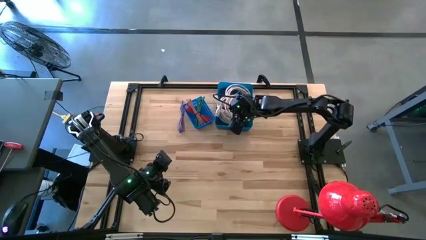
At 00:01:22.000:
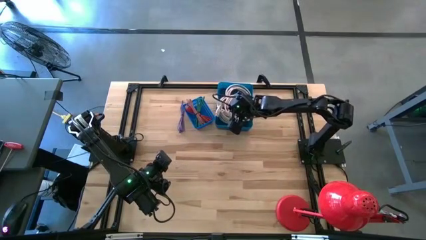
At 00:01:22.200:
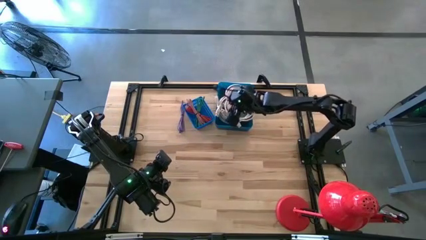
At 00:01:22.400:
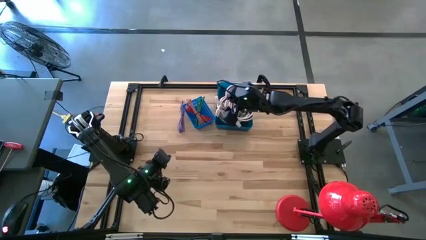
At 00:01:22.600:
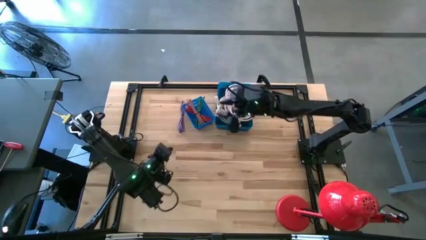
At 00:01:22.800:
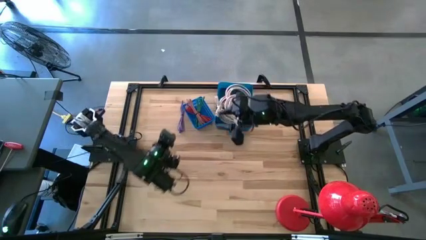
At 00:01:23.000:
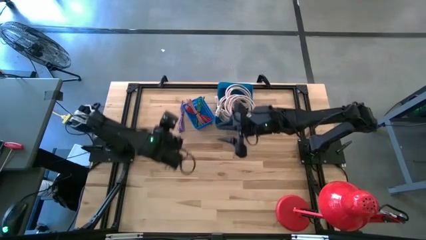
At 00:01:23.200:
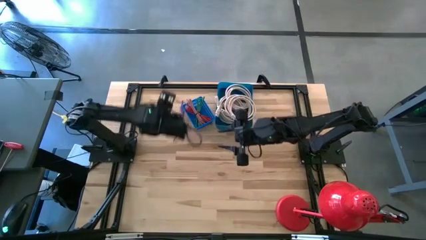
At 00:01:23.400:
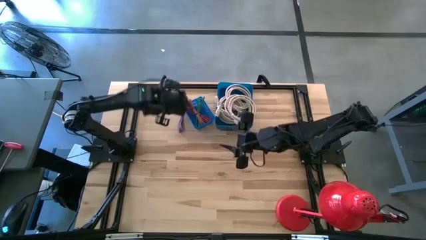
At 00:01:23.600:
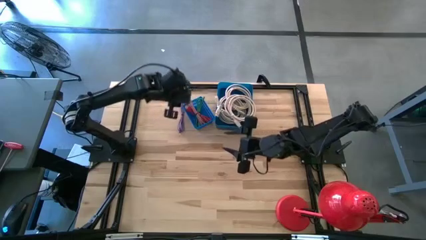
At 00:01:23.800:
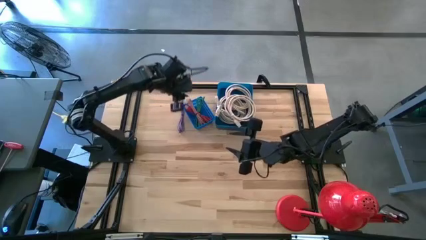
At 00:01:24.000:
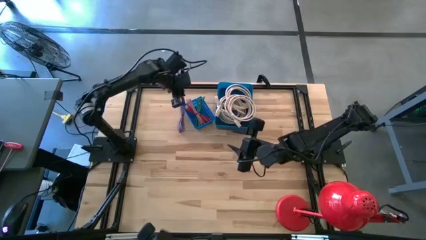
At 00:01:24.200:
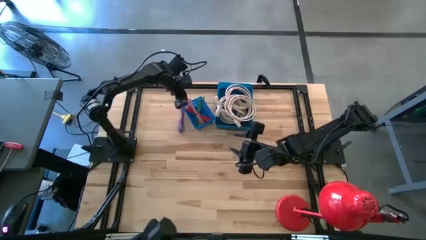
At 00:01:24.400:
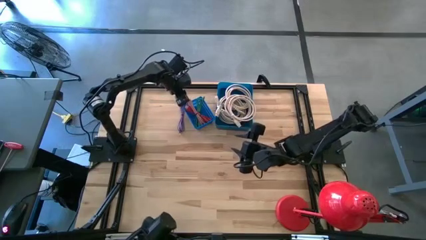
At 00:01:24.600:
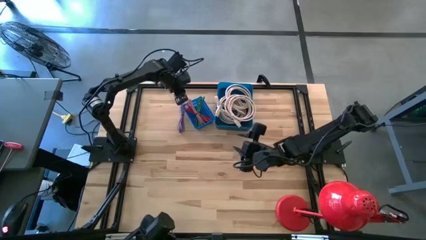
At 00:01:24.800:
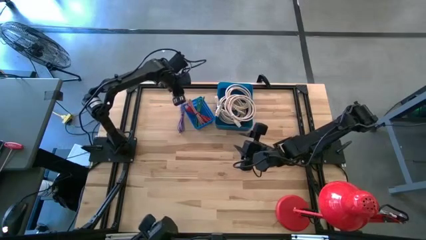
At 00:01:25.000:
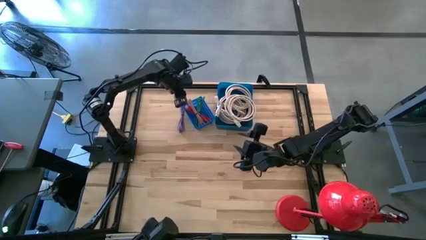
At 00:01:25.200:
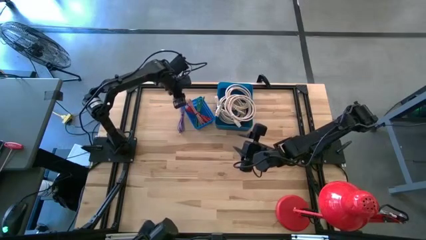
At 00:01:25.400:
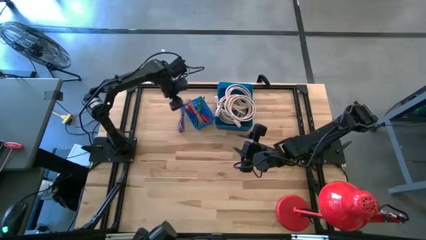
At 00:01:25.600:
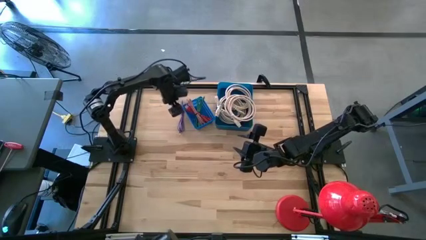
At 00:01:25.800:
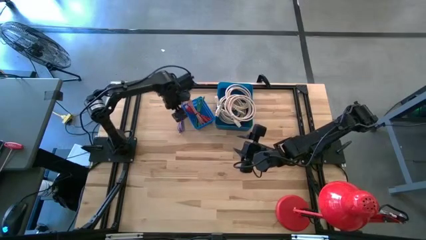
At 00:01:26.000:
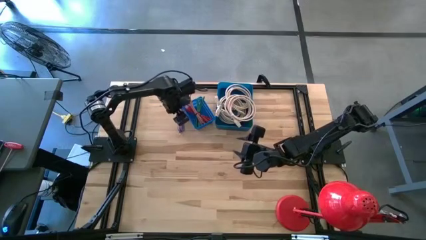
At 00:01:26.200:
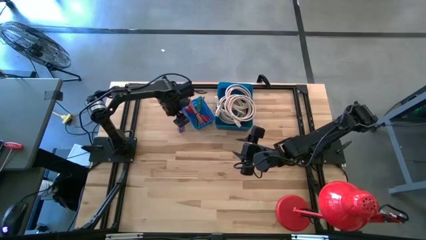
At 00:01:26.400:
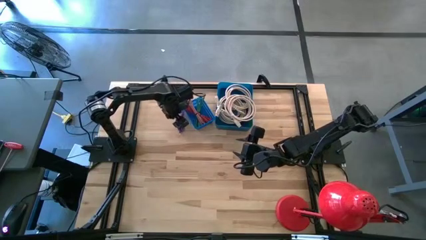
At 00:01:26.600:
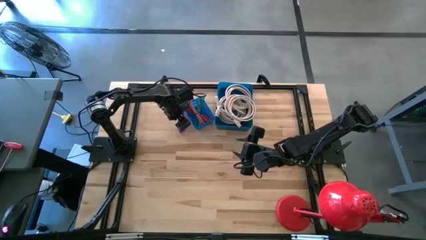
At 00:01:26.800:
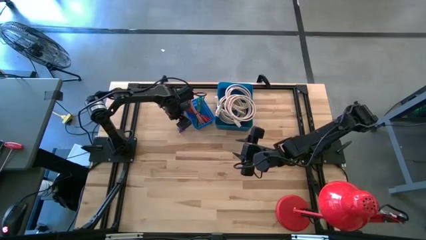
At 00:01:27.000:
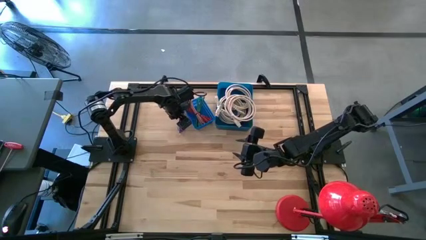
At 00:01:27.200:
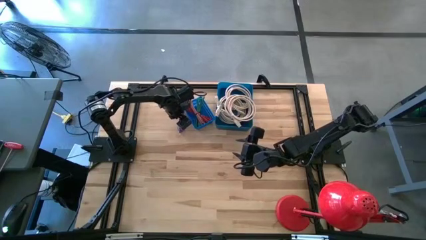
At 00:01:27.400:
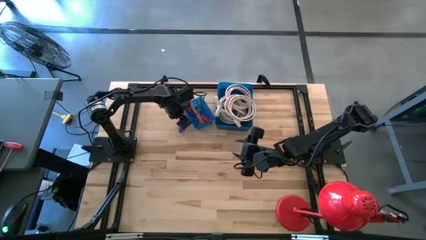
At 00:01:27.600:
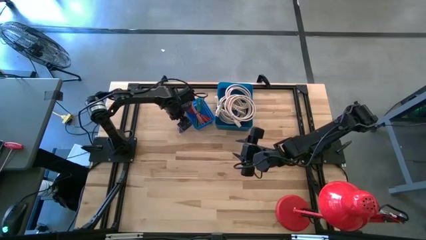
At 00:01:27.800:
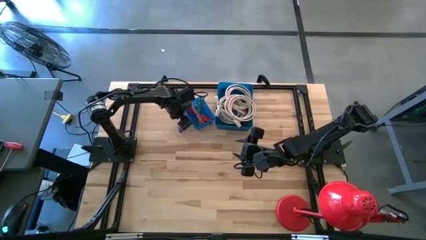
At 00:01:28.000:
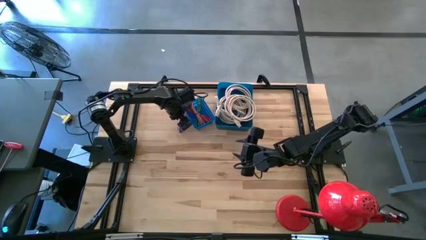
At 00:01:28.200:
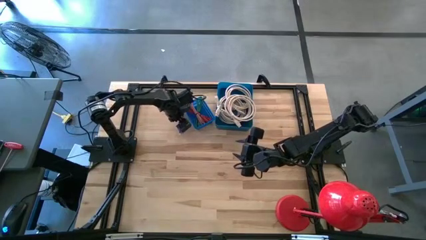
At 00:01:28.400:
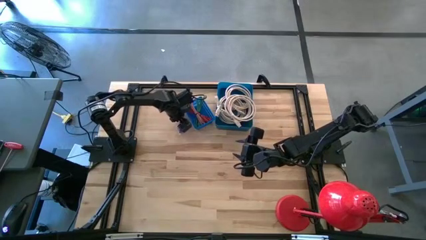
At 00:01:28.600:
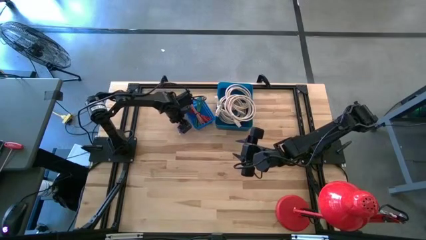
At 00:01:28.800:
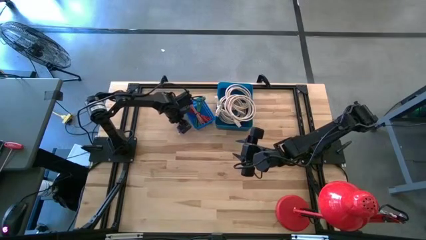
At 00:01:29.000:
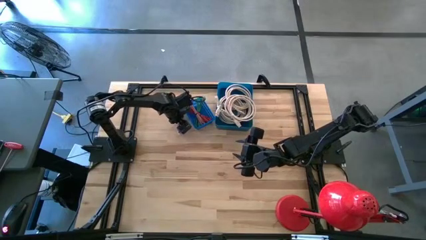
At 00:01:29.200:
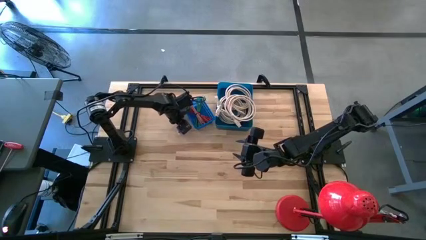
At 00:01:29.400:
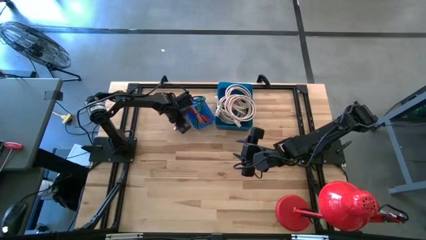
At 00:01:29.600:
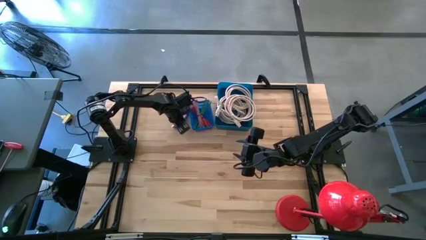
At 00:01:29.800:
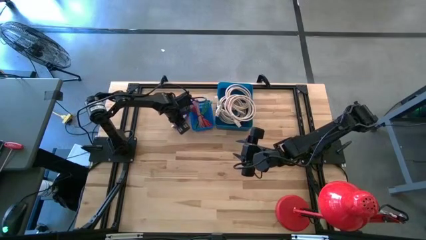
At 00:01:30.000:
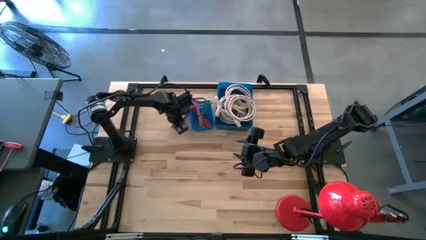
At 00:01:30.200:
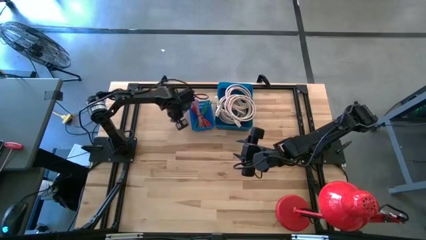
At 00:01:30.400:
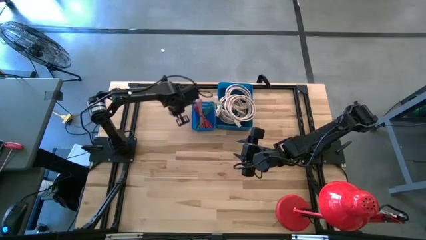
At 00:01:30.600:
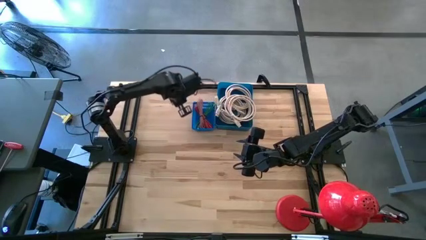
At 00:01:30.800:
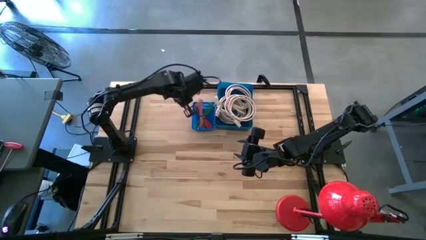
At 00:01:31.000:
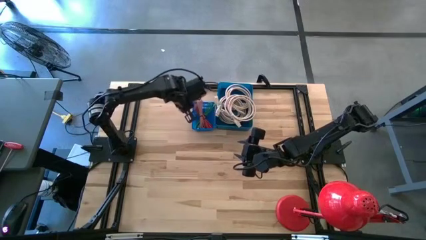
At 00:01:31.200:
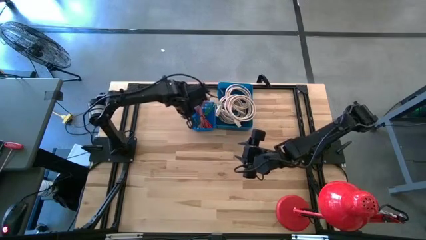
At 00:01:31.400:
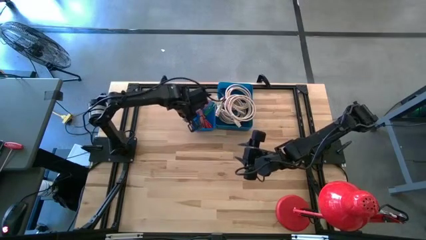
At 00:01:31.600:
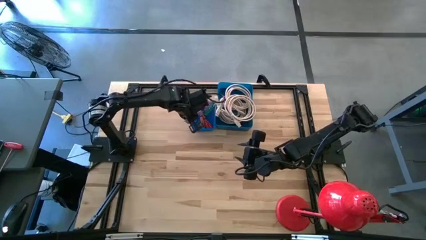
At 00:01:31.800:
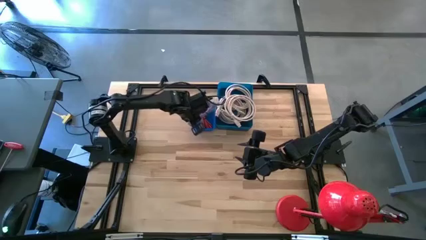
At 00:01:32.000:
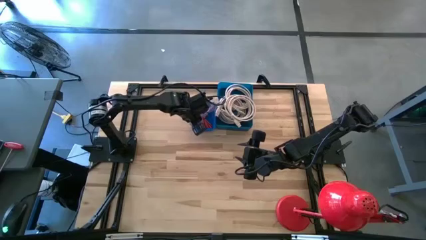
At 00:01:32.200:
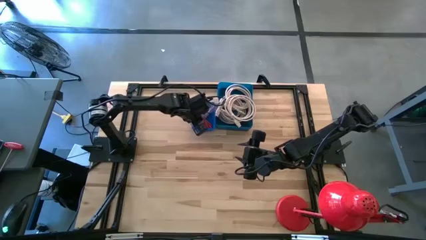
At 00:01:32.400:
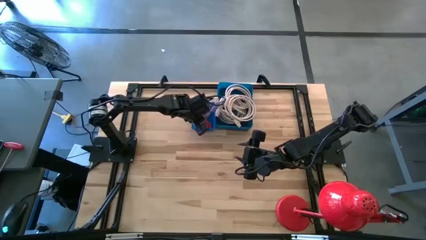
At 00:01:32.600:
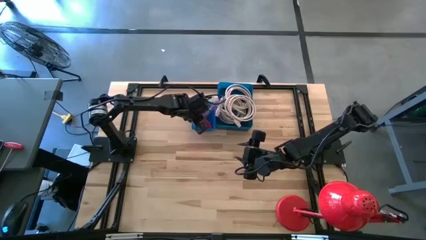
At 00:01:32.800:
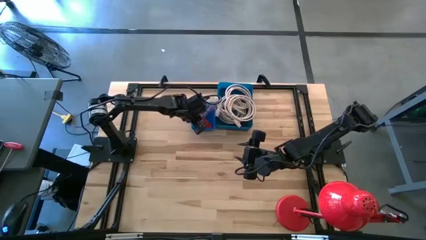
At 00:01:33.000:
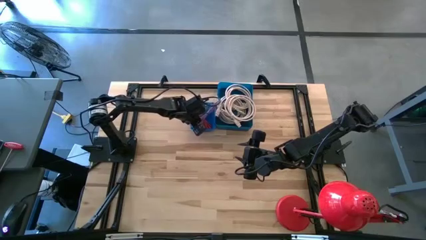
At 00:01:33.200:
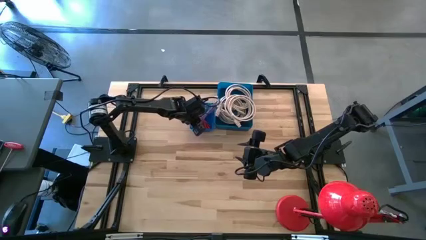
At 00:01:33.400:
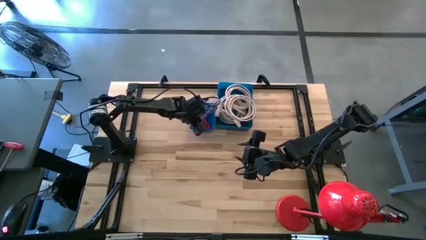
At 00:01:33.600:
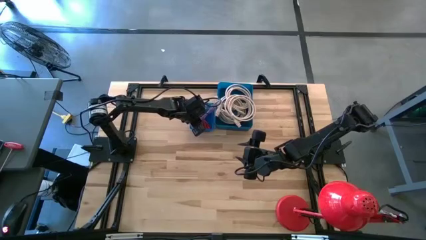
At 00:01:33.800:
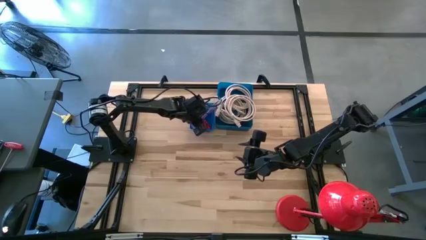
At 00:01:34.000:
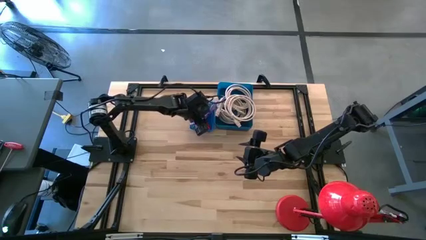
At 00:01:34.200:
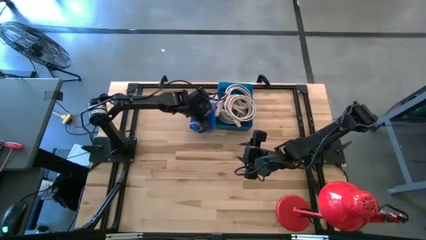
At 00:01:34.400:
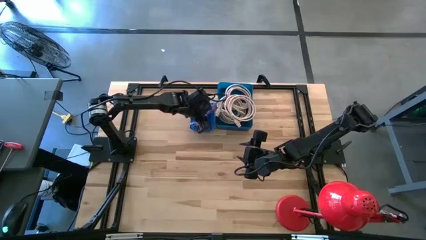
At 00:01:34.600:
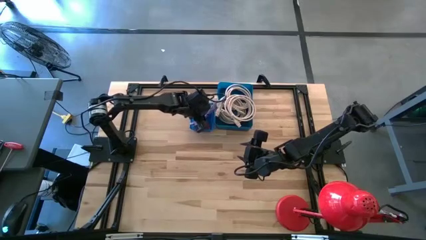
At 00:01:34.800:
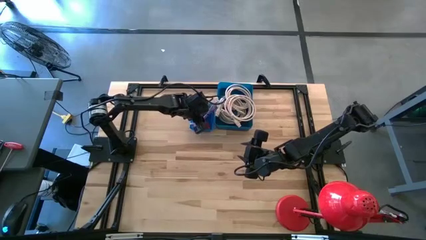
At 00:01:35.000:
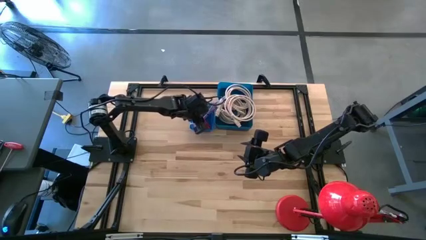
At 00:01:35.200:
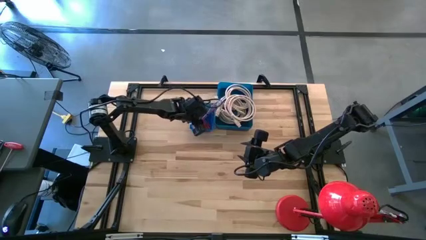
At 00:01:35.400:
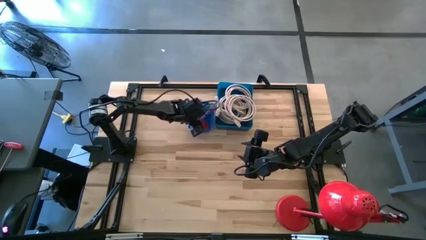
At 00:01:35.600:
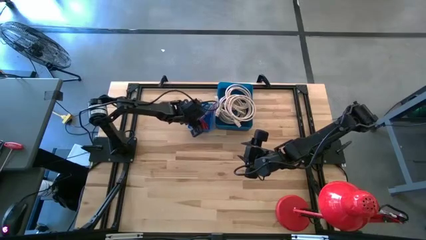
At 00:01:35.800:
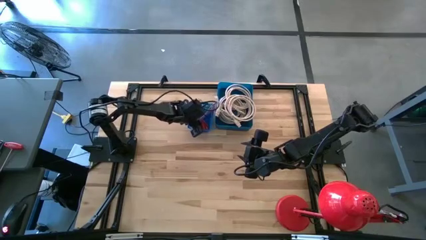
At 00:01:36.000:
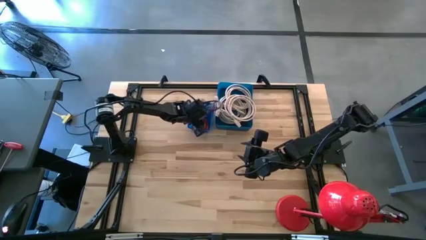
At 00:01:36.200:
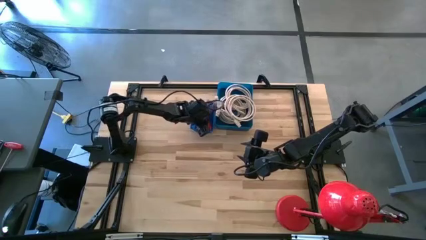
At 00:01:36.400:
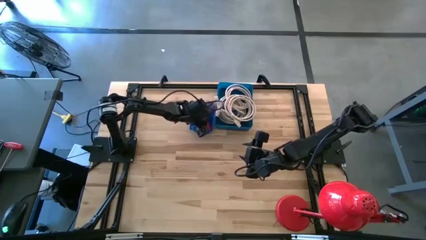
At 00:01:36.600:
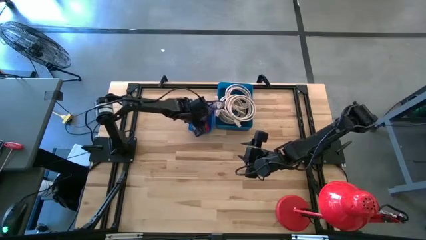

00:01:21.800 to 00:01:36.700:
Task: Pick & Place USB Port
Put the purple charger cable into the blue bin
